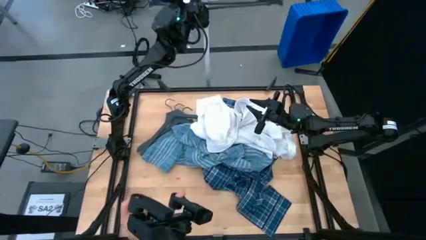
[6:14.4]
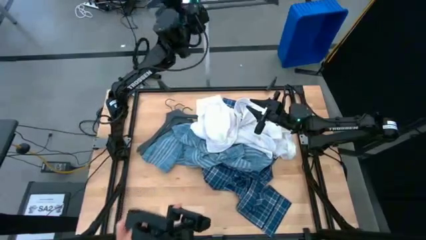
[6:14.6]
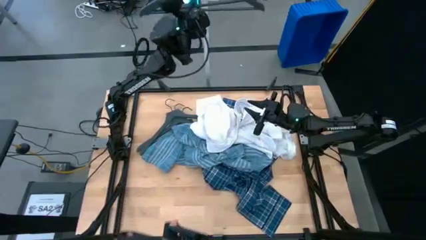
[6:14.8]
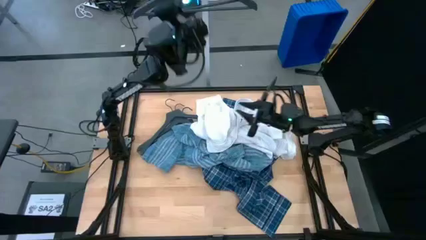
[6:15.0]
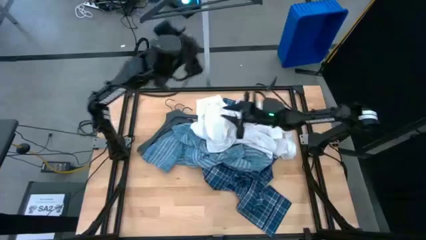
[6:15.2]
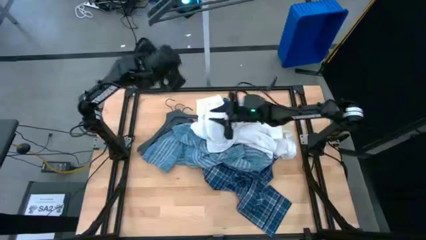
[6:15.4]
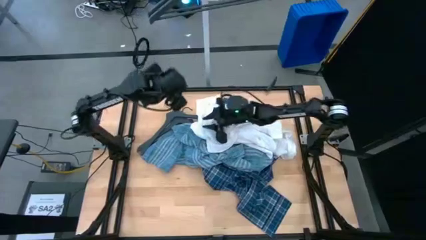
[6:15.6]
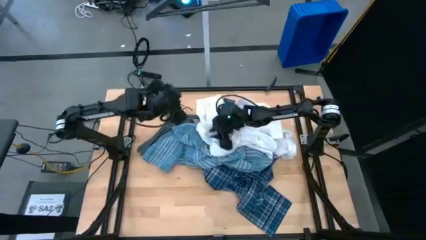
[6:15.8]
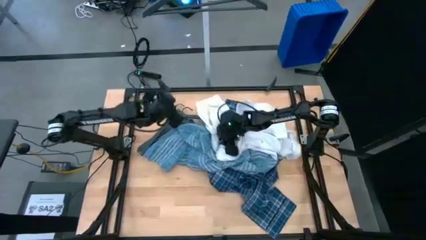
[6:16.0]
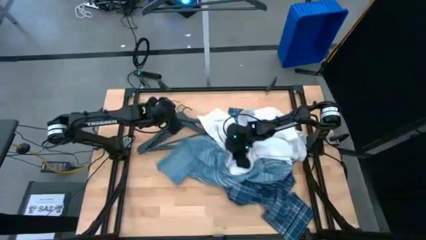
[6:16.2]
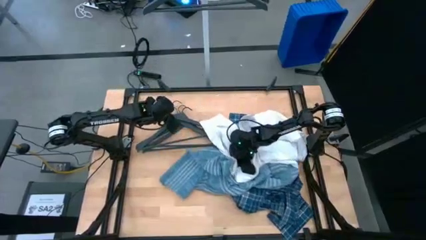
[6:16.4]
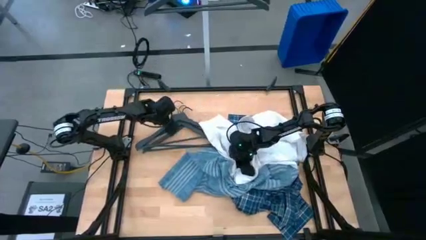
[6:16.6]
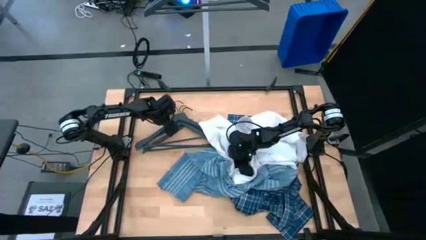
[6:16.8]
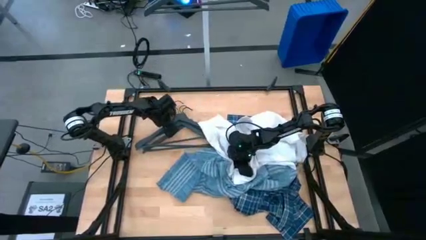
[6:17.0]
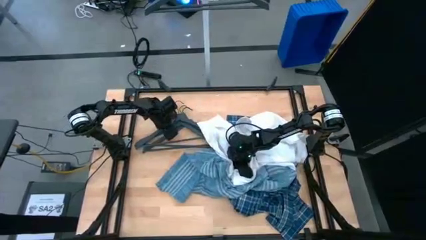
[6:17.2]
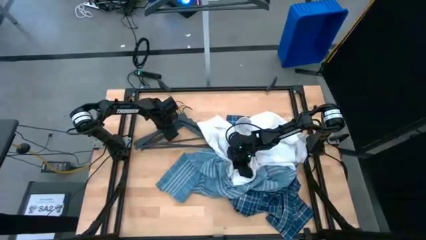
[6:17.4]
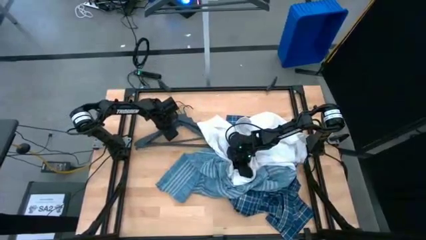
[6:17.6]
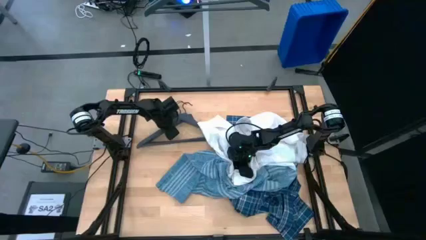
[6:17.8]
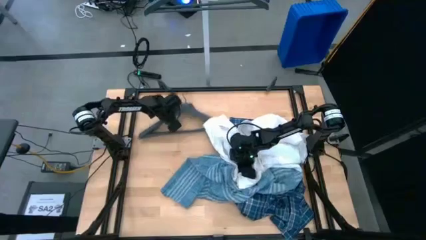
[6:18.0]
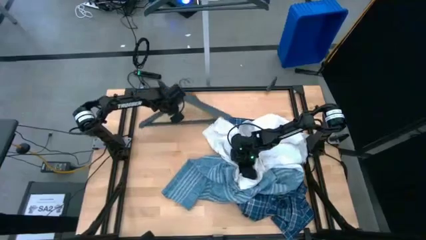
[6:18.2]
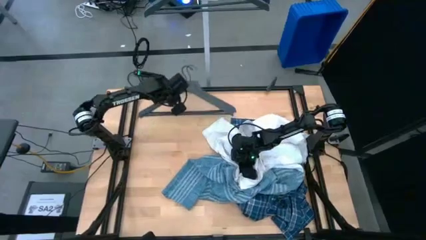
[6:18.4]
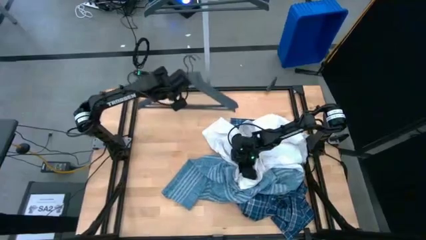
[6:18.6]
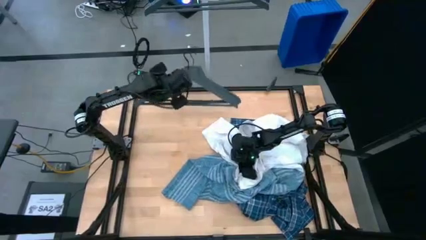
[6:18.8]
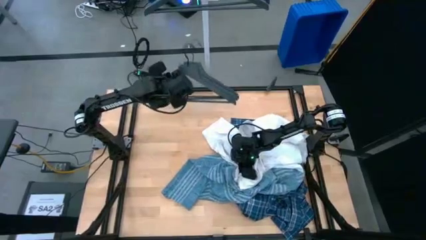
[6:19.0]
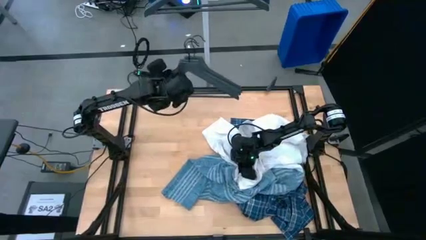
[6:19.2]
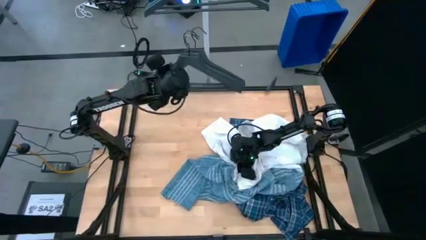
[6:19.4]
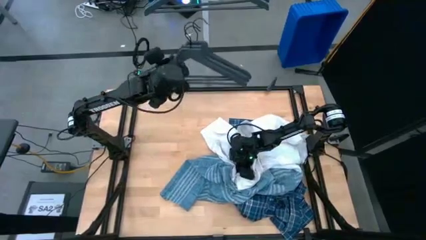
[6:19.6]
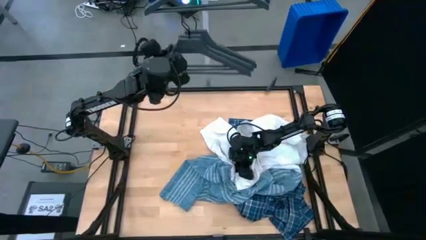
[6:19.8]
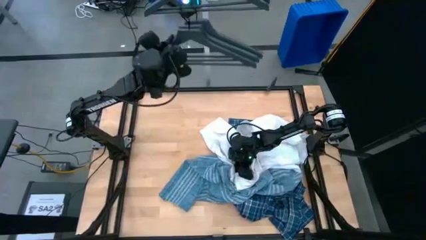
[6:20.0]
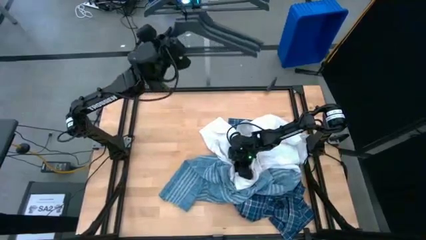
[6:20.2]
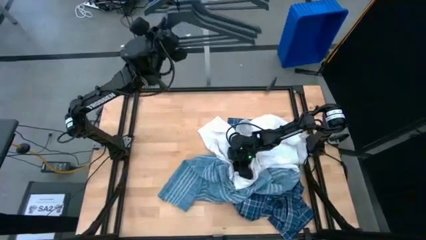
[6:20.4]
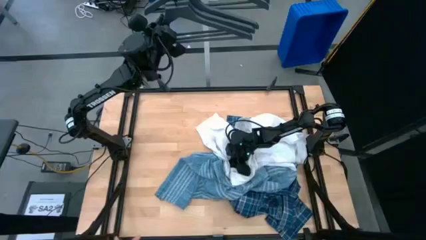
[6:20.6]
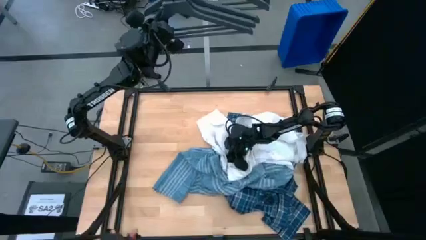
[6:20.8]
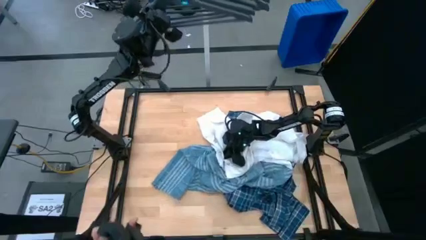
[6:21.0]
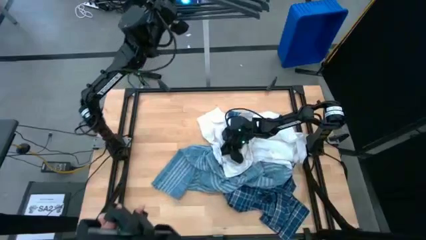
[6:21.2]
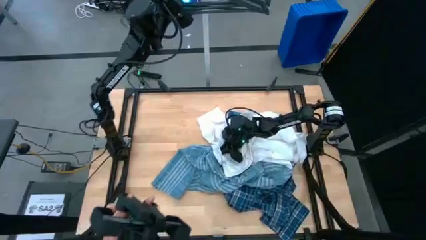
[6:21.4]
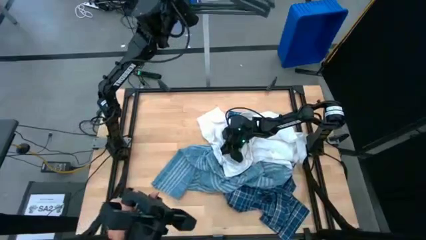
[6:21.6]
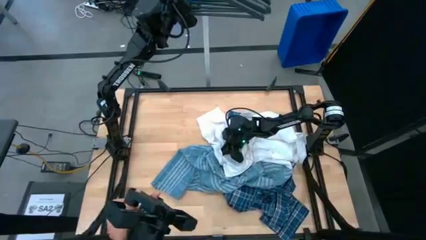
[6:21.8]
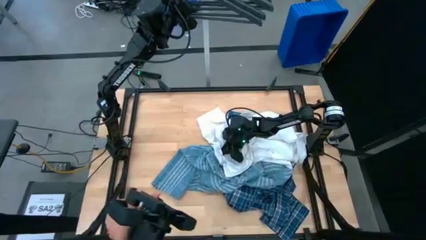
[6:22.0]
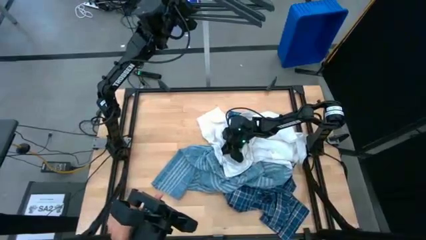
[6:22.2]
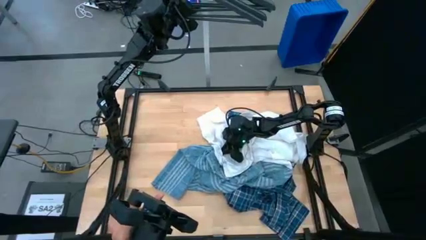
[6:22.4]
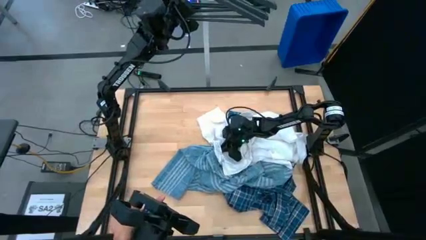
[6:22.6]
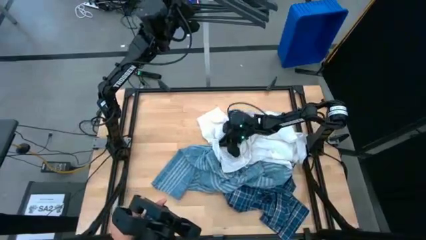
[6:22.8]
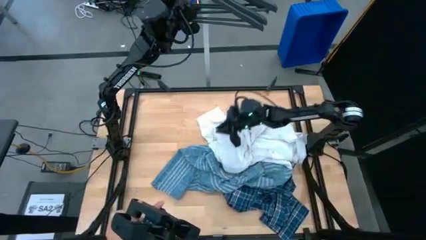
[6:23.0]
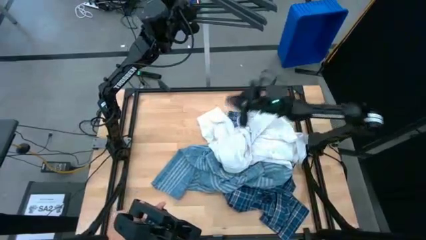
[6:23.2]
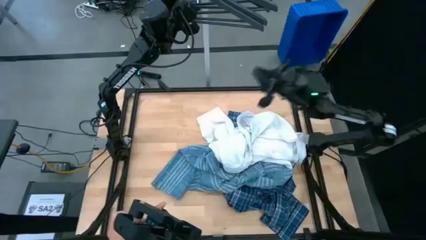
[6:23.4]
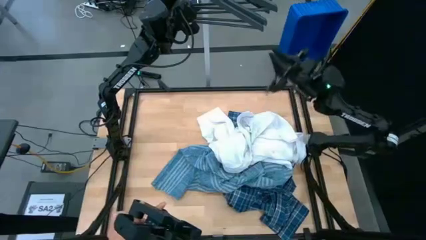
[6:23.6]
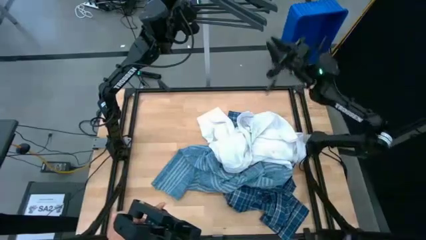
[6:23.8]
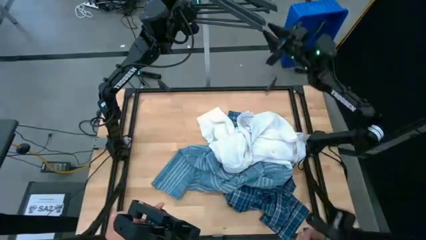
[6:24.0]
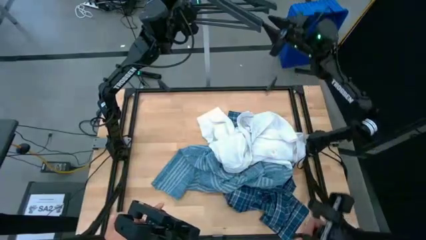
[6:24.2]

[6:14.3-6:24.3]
Task: Hang clothes
Hang the black hangers on the hanging rack

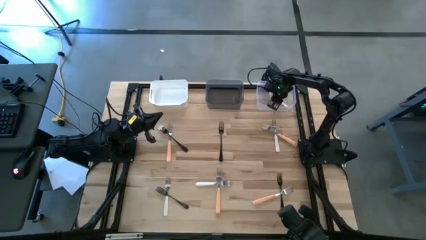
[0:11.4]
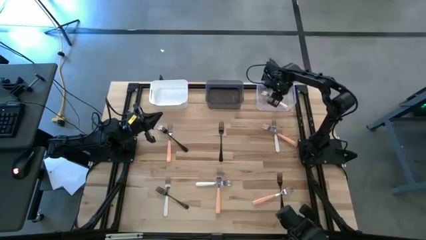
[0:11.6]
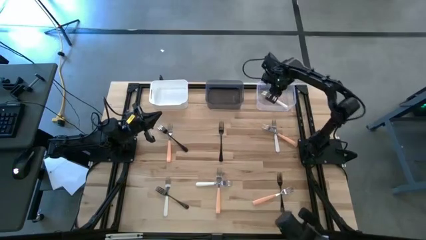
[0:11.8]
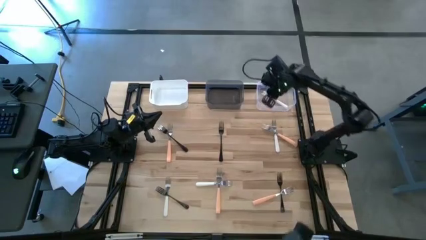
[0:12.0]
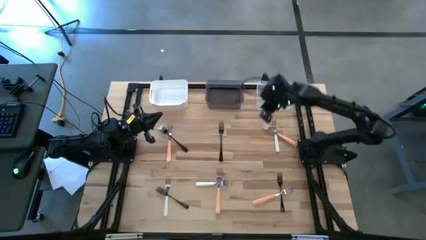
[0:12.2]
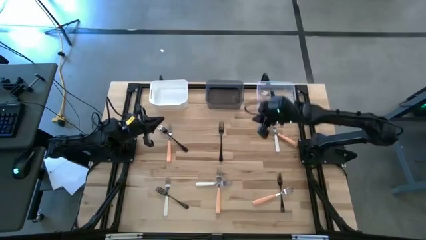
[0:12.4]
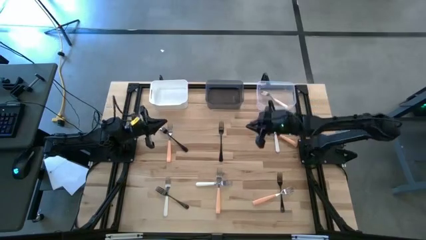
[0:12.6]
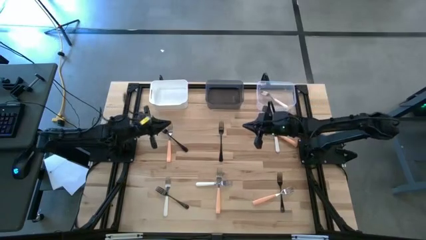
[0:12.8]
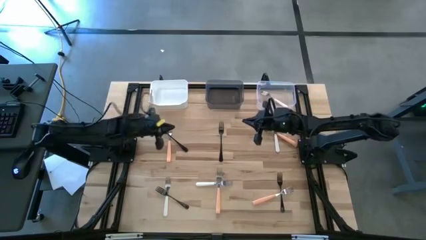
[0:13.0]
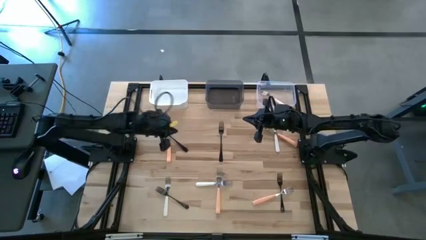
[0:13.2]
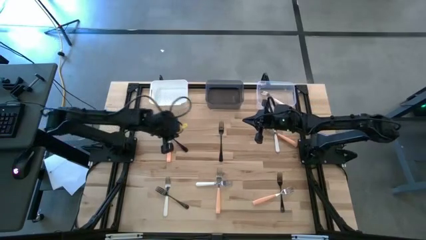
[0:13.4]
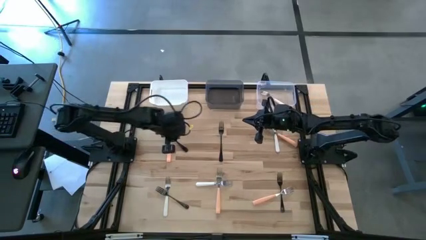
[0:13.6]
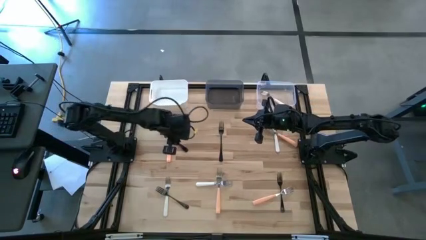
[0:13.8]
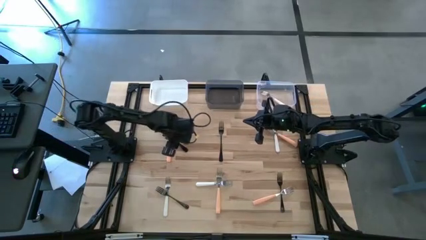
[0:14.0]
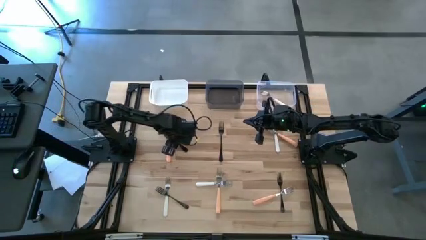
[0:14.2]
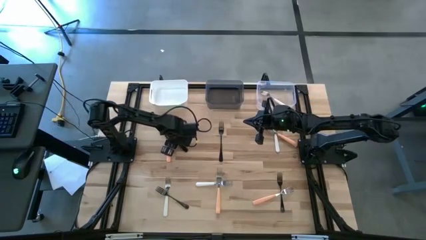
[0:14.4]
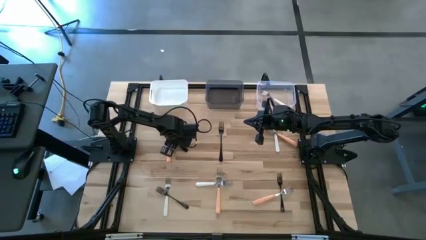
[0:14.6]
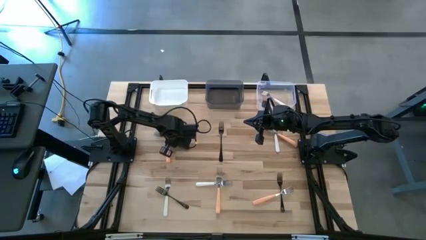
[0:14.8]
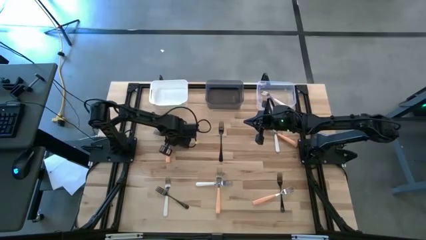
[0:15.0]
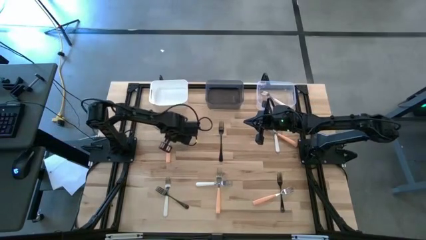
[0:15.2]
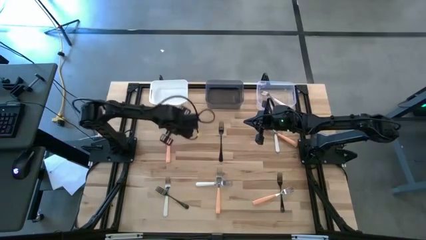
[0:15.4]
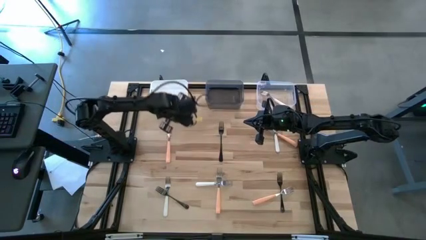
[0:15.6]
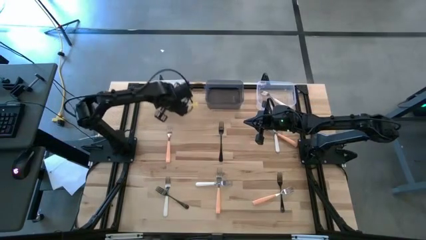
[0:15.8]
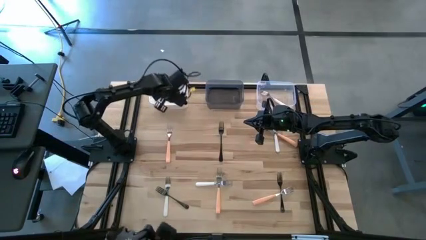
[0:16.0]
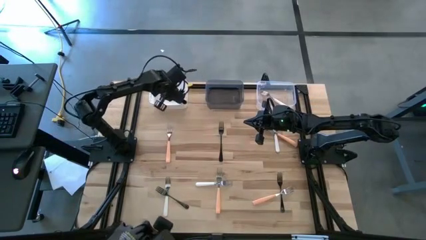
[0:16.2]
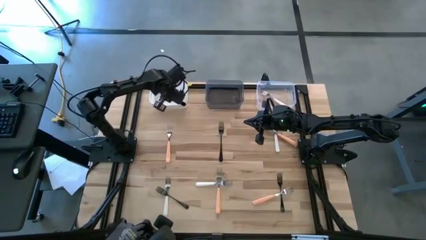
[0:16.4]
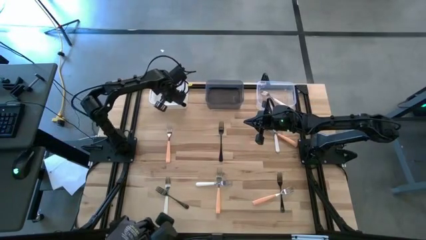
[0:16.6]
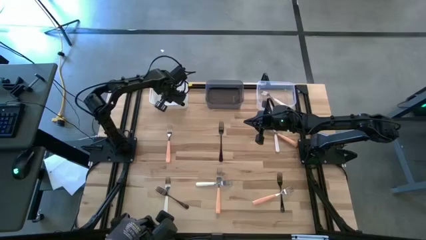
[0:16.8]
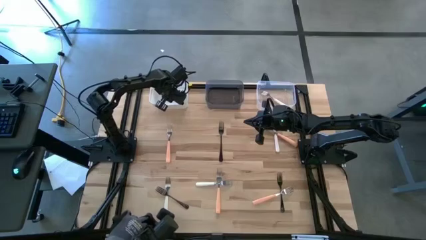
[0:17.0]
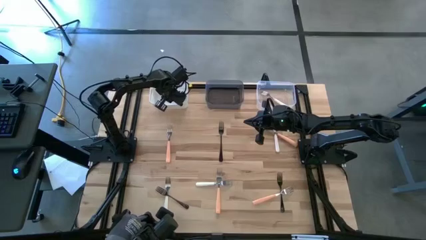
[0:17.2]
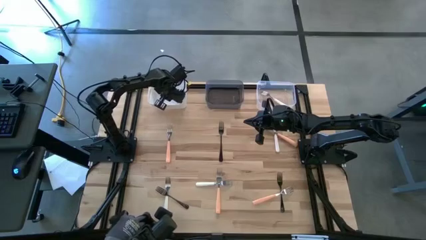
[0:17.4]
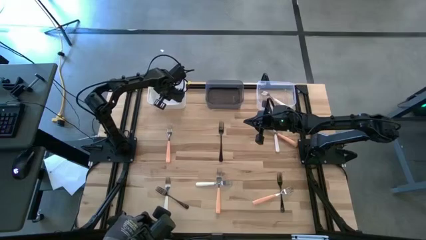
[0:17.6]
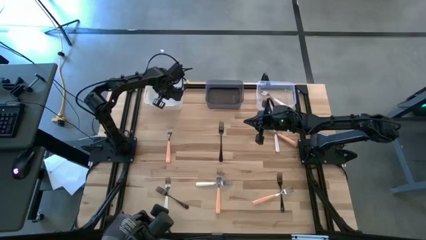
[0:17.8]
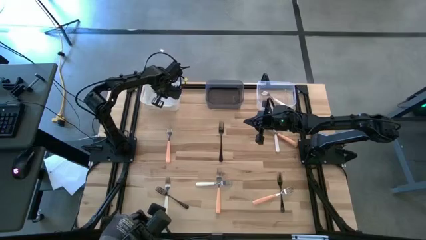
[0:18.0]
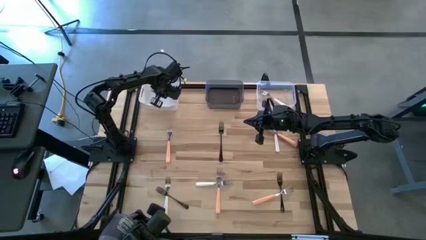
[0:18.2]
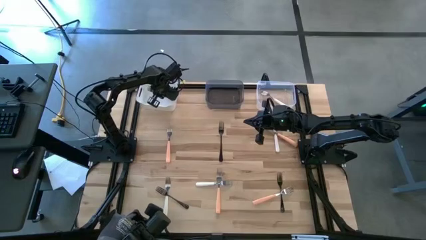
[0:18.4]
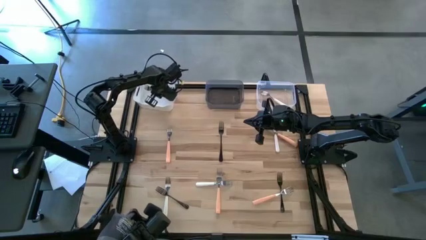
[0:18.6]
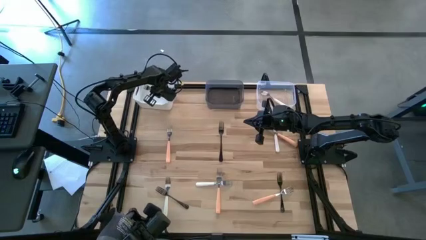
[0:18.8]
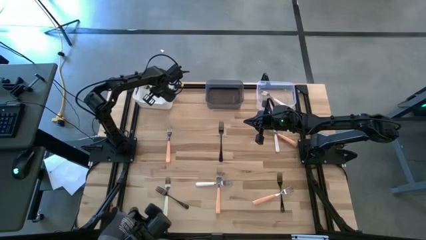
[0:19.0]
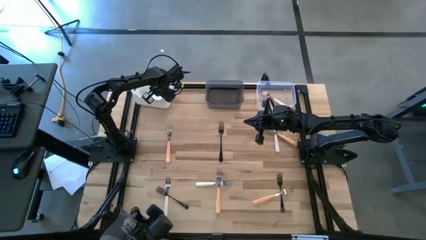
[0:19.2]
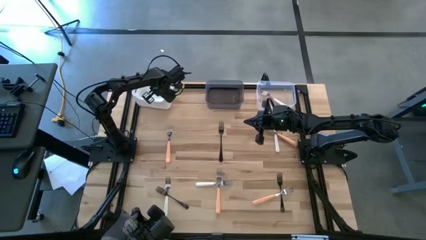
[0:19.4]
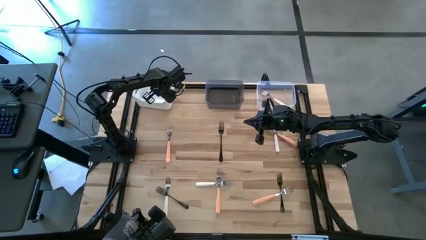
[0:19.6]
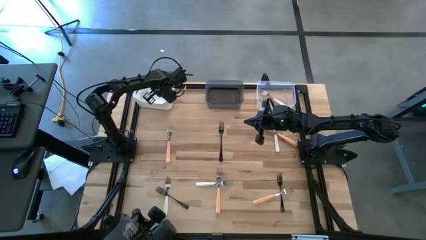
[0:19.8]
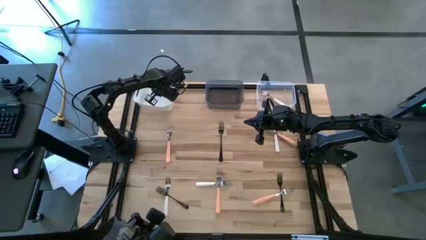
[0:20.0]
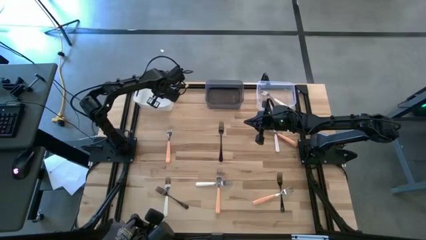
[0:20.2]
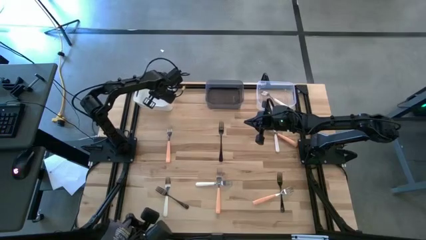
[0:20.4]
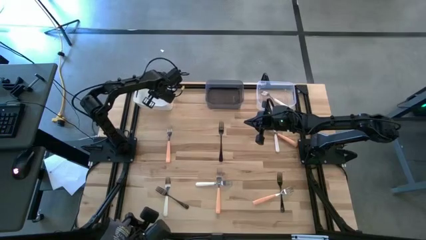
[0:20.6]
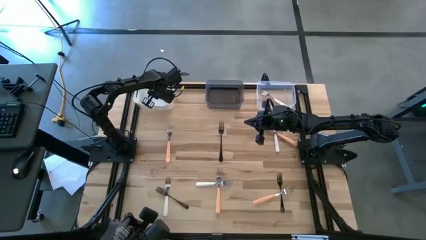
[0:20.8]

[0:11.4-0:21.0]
Task: Sort silverware by color (type)
Put the top left black fork into the white bin
